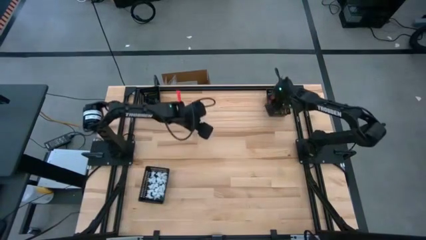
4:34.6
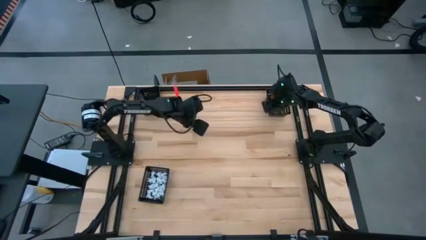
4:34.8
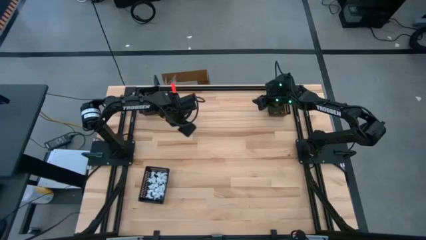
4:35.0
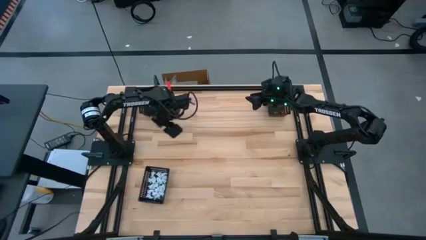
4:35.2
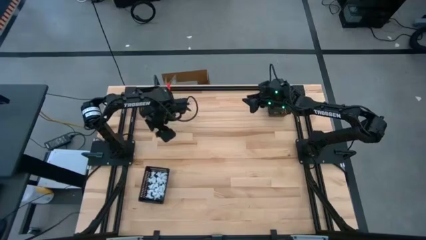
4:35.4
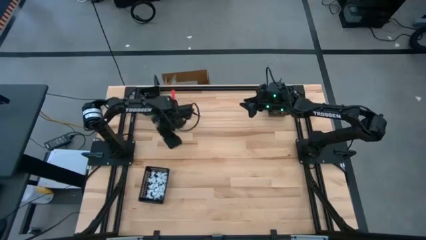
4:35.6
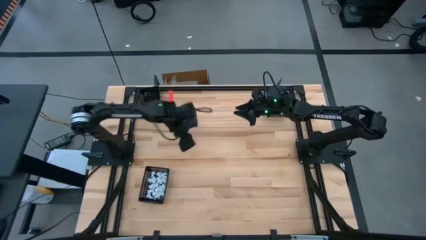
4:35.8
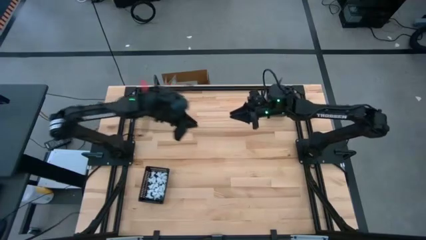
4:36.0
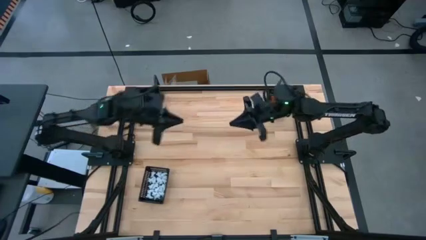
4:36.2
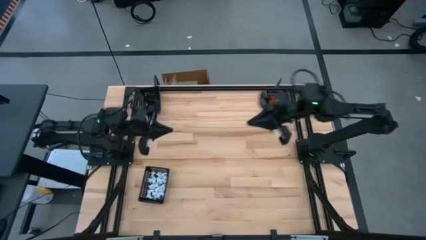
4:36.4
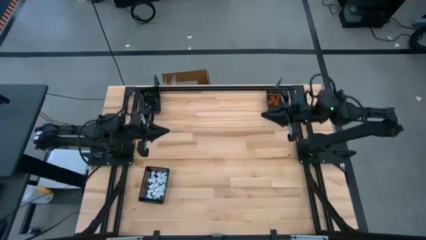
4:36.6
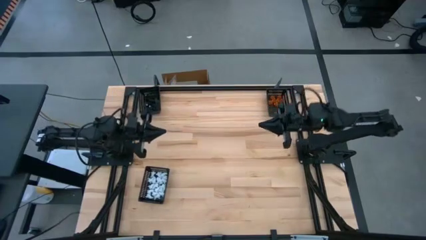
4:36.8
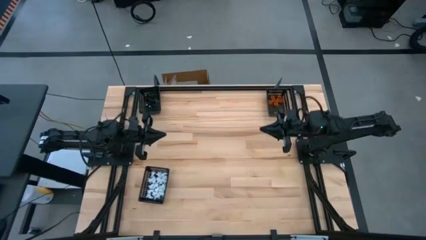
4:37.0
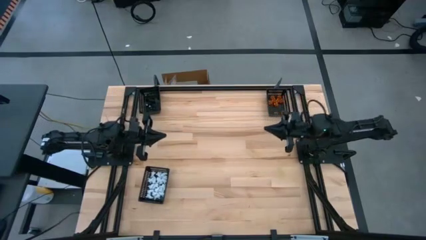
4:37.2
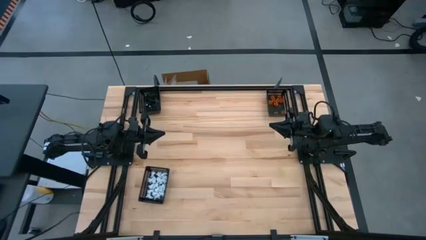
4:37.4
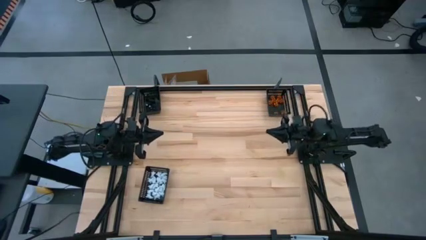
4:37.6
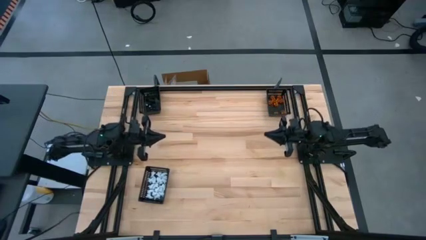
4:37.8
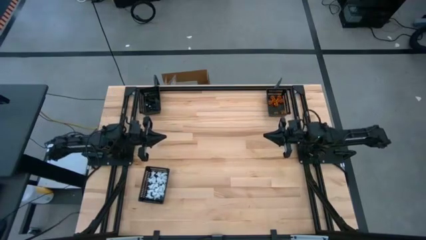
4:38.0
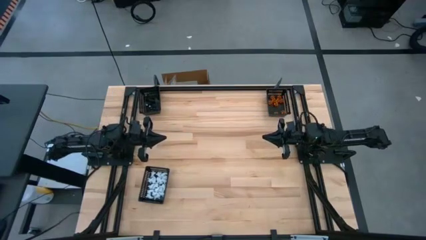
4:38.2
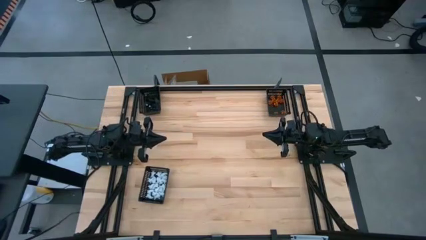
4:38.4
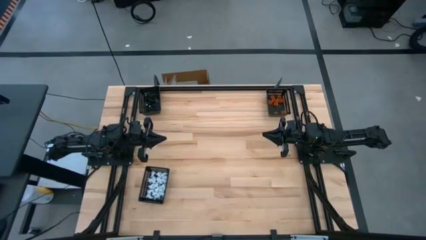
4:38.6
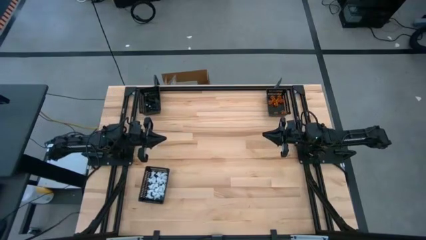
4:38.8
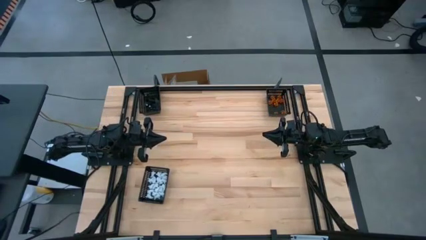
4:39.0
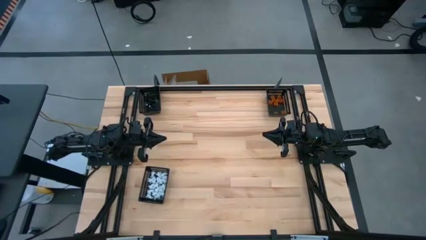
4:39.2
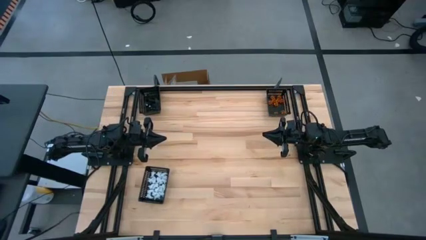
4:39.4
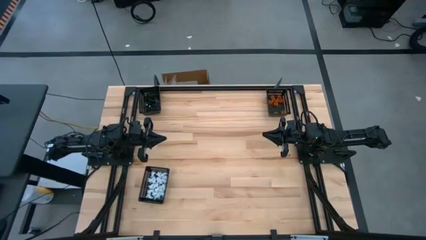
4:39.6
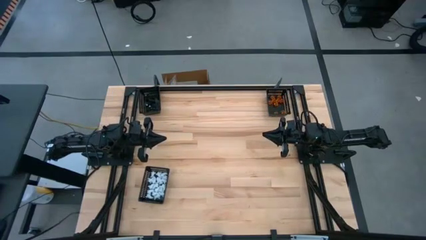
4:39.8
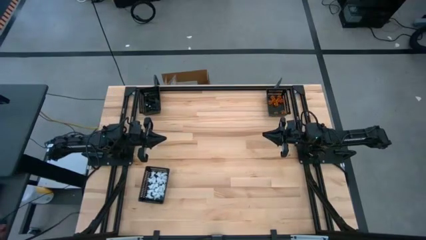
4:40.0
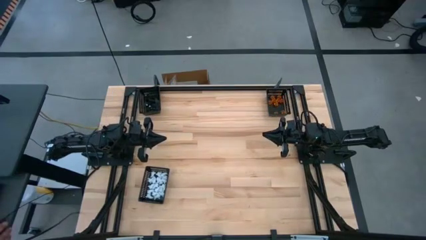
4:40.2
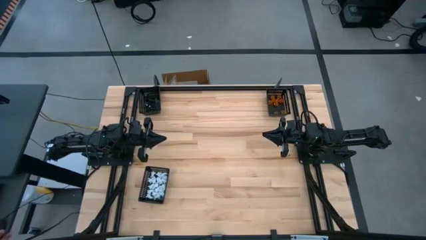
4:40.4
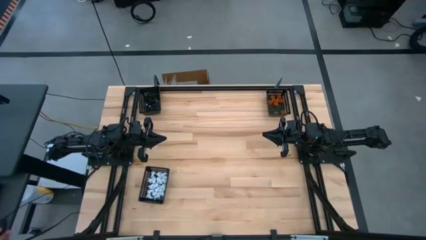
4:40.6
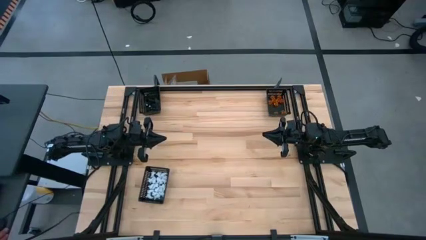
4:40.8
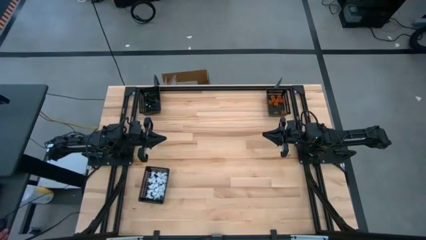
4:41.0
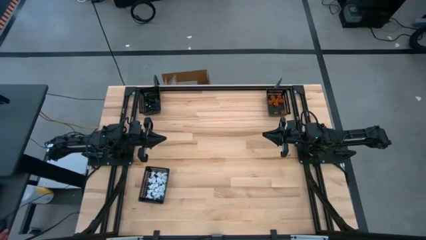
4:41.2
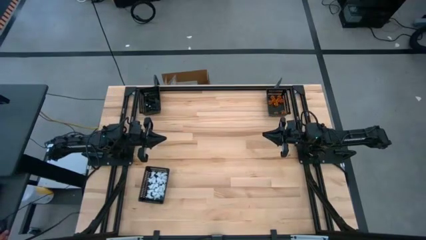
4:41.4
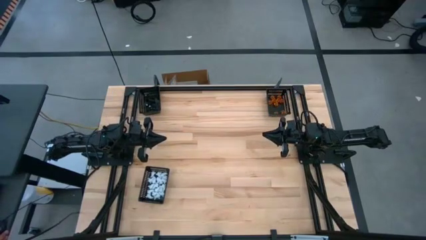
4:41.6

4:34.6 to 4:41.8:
Task: Sort Halloween decoration
Return to Home Position

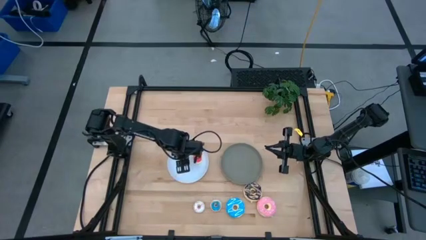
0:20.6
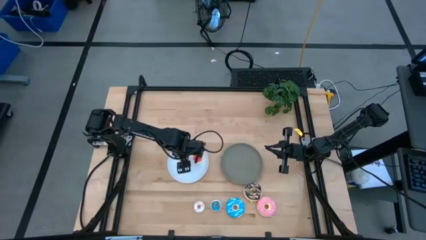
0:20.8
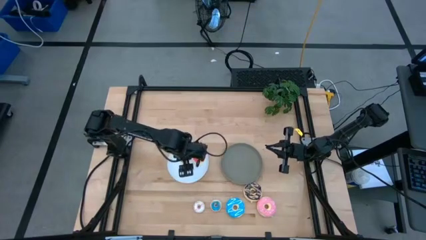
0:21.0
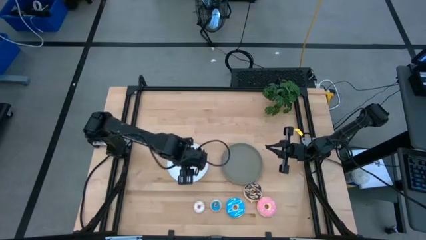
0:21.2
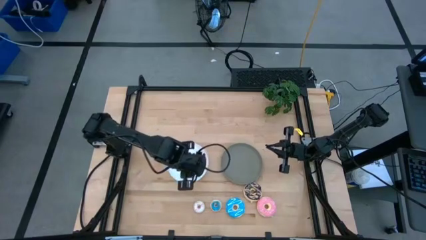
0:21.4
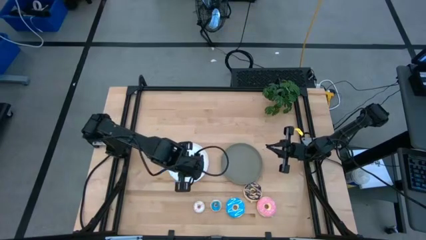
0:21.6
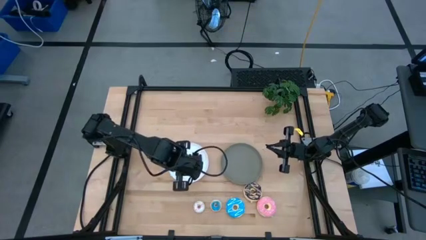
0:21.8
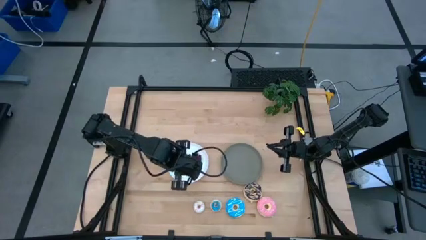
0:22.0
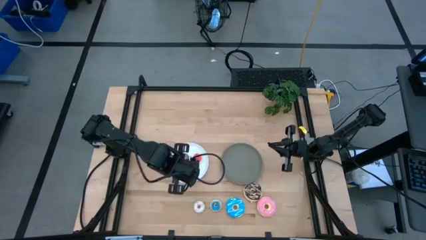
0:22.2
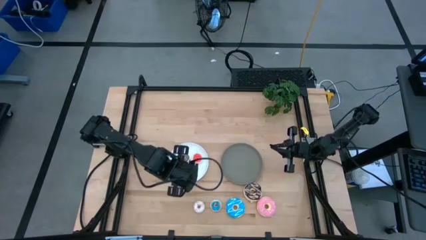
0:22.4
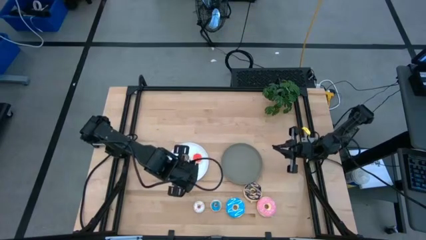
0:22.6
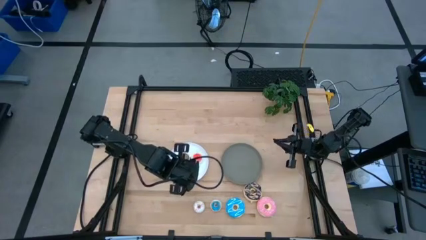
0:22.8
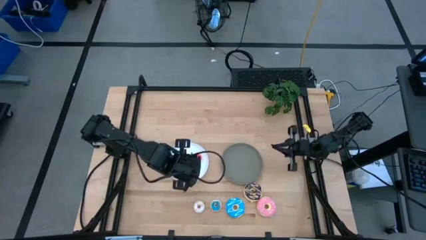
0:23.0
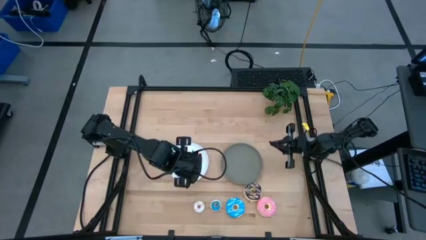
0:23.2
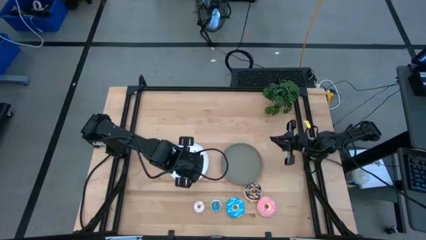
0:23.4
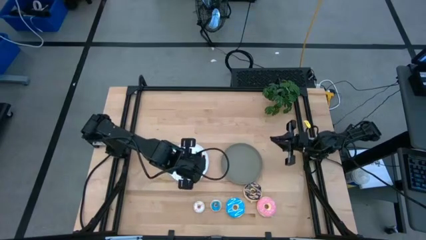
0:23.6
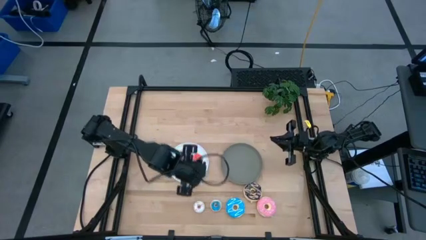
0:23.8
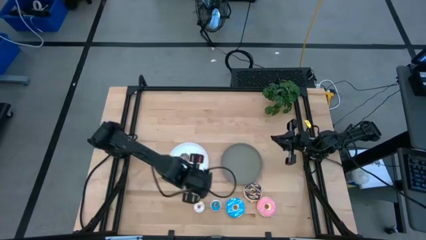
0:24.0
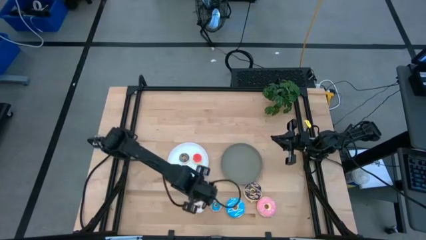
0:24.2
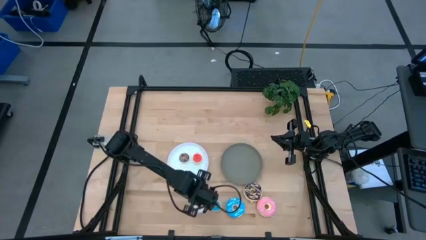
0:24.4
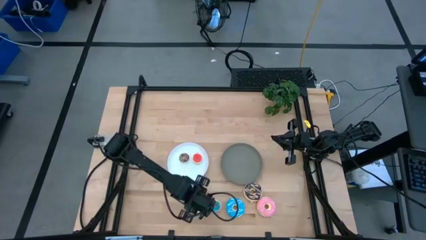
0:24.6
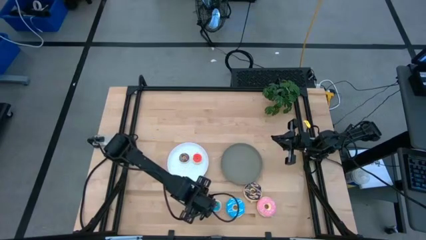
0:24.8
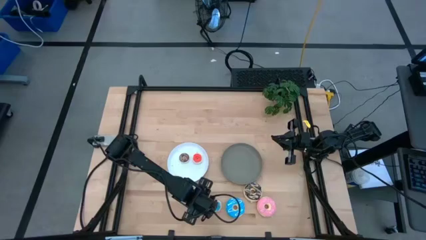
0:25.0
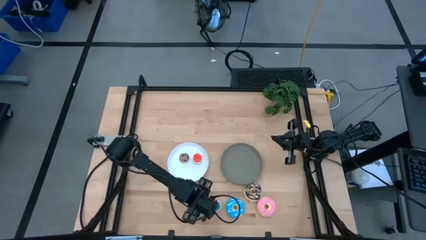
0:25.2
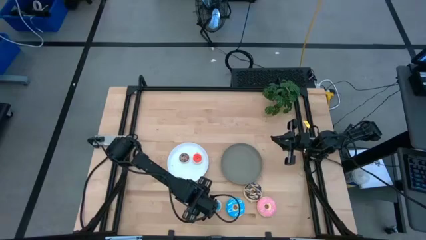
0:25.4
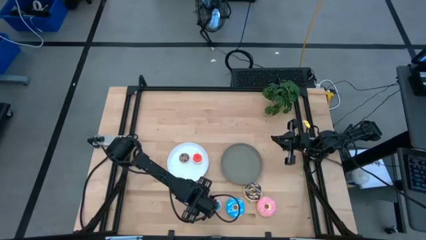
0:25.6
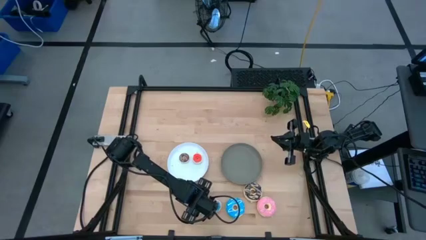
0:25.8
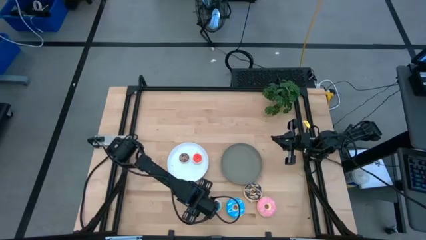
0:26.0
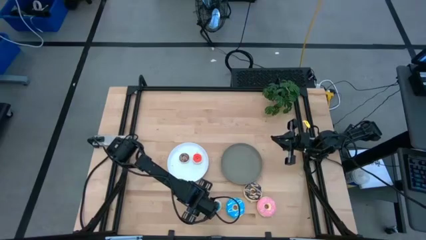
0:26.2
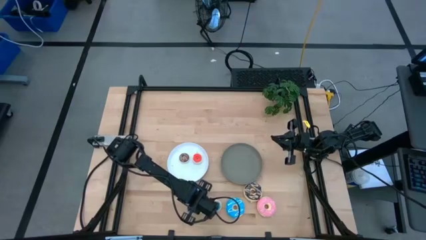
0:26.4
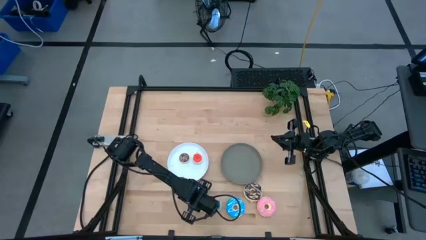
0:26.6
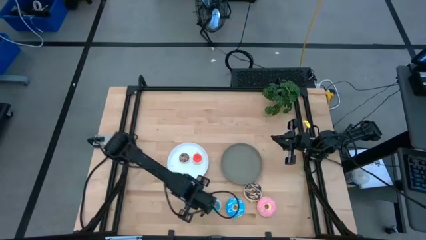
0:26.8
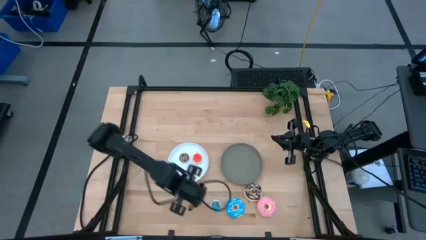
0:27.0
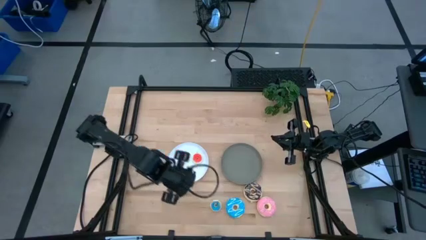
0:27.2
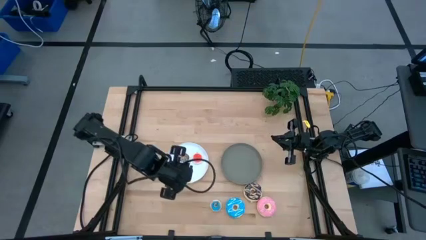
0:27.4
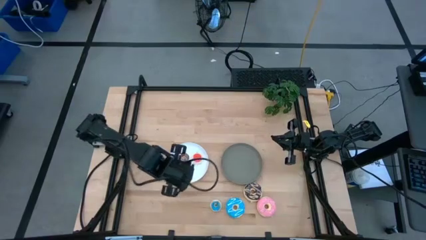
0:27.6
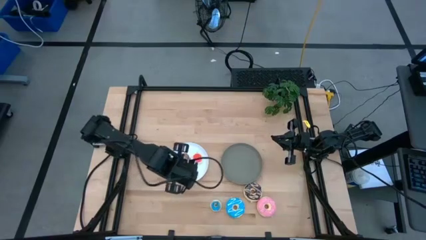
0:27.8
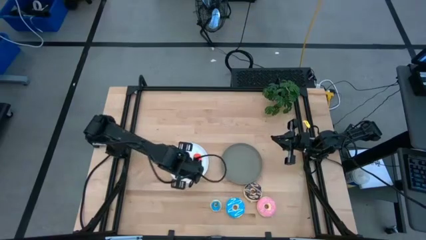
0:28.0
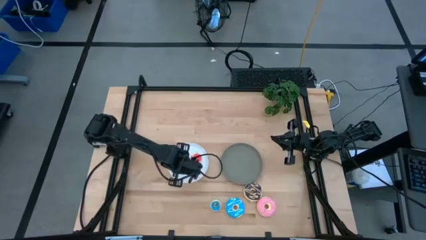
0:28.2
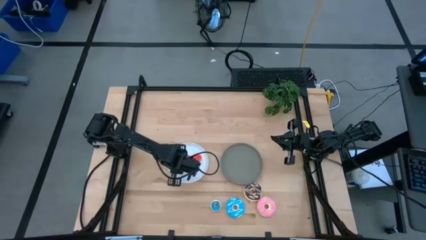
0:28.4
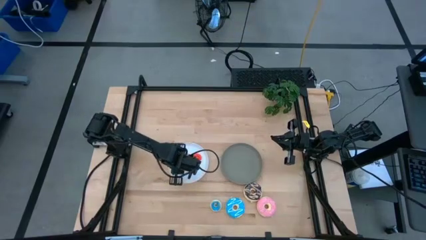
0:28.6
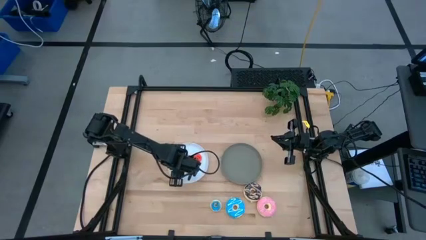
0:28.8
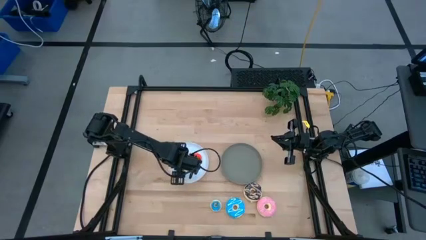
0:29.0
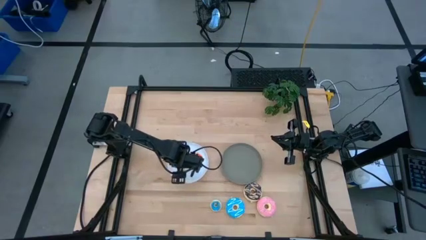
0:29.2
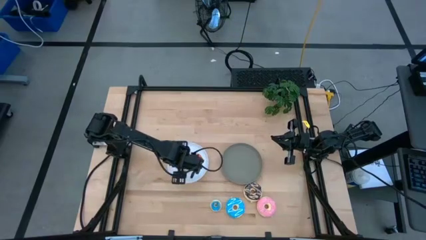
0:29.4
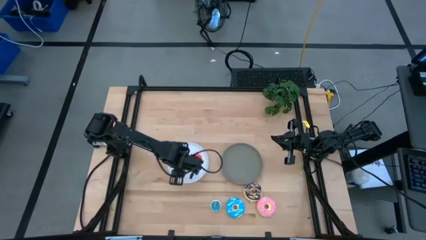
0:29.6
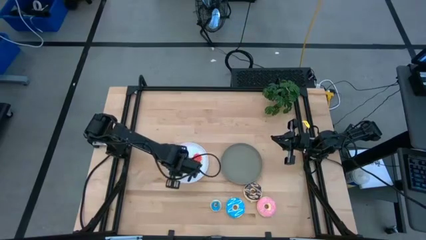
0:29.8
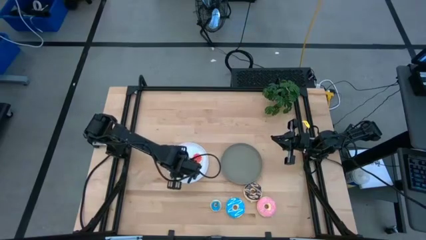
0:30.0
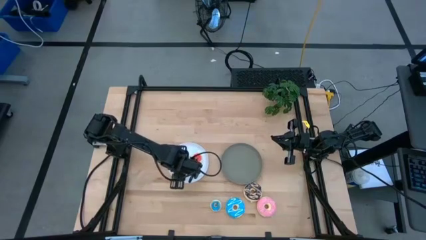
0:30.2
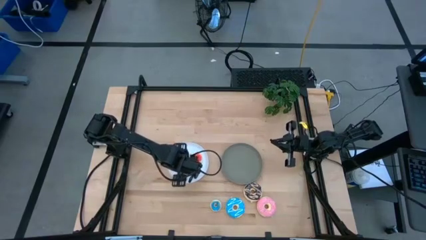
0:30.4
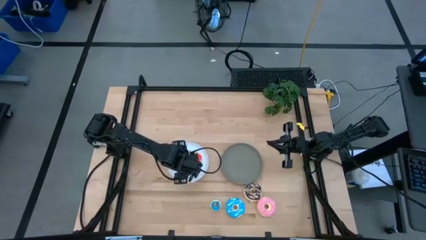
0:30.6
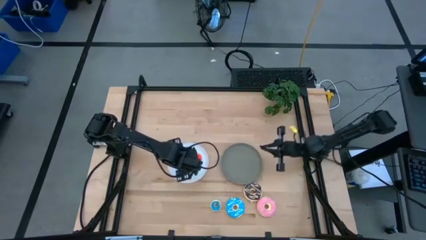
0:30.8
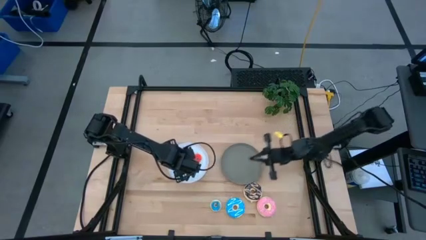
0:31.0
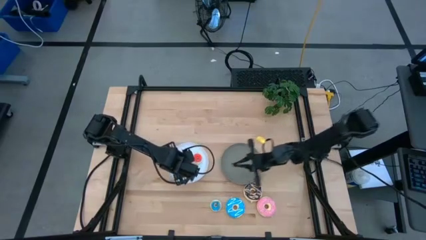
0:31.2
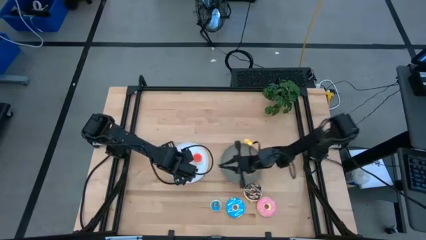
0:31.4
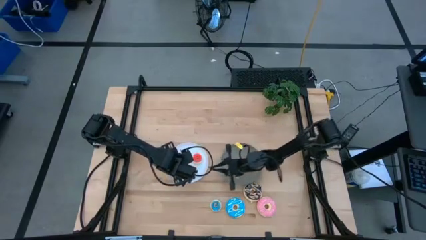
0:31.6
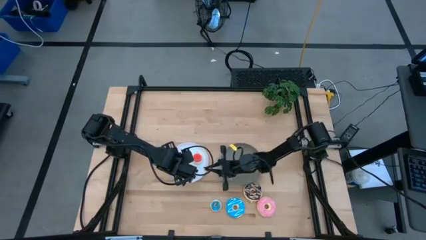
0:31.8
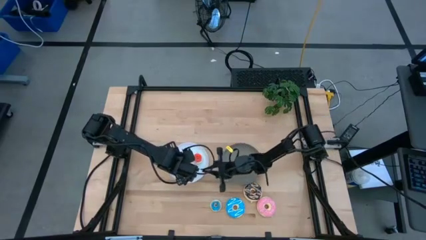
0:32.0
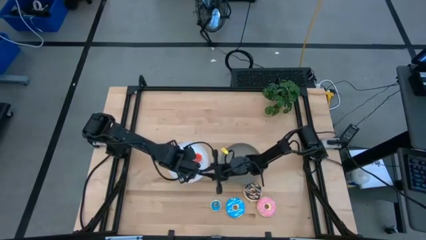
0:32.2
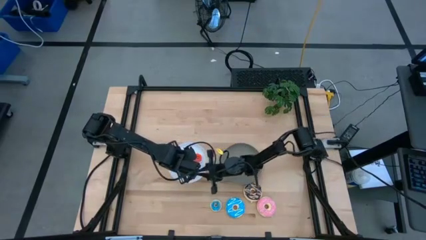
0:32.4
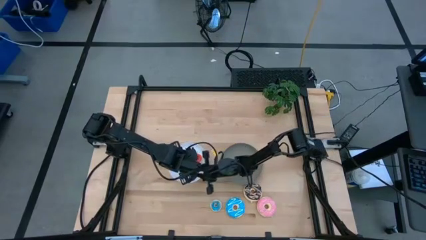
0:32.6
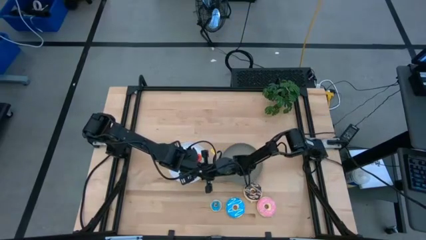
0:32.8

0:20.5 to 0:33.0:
Task: Pick & Place donuts
Put the small white donut on the white plate
